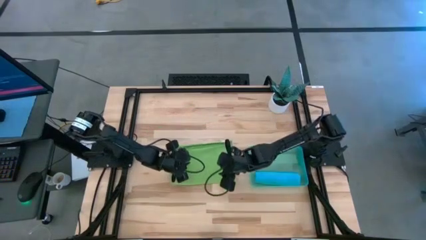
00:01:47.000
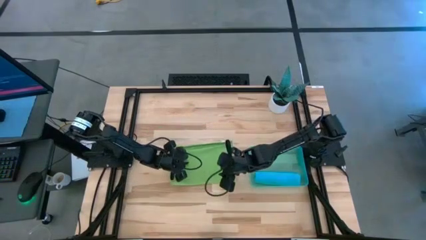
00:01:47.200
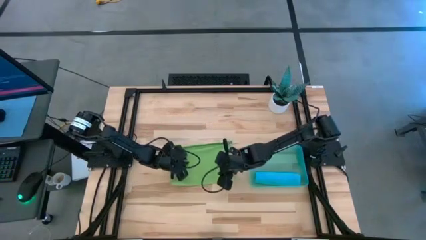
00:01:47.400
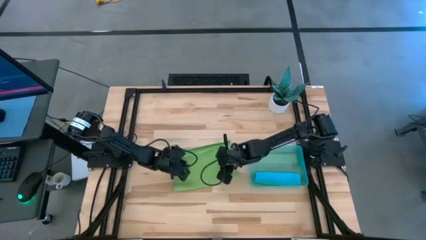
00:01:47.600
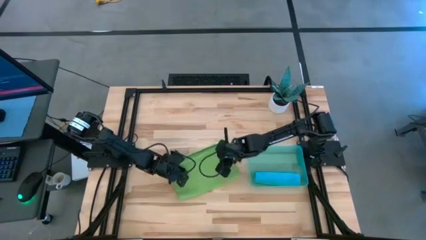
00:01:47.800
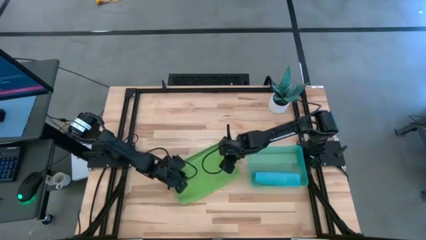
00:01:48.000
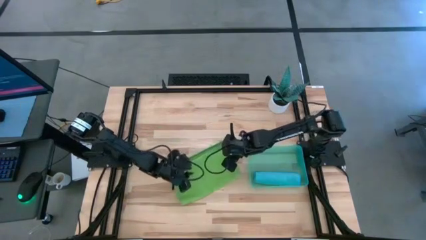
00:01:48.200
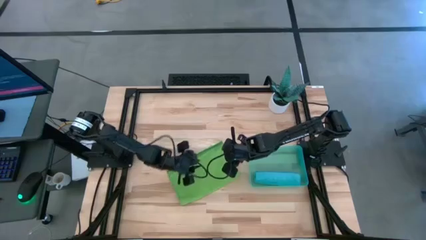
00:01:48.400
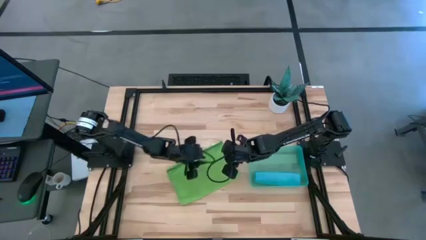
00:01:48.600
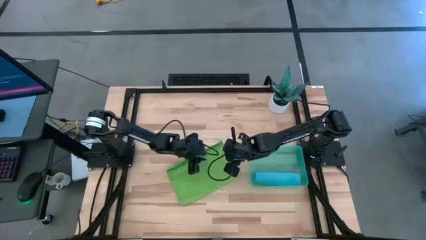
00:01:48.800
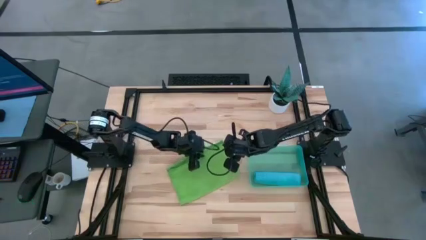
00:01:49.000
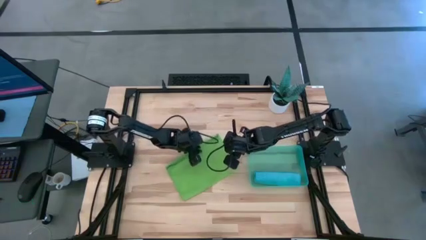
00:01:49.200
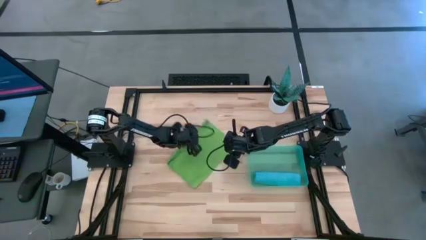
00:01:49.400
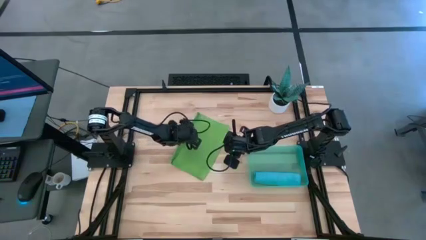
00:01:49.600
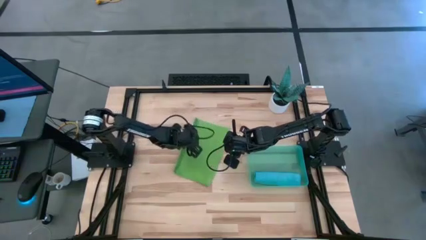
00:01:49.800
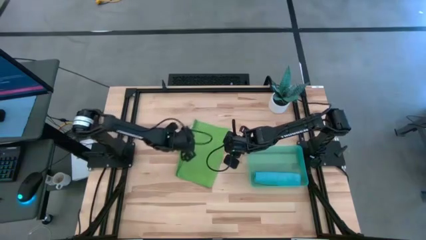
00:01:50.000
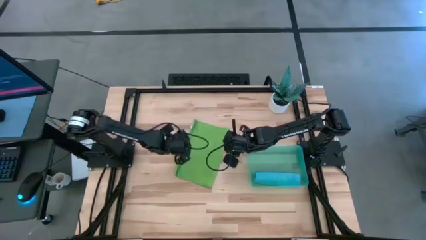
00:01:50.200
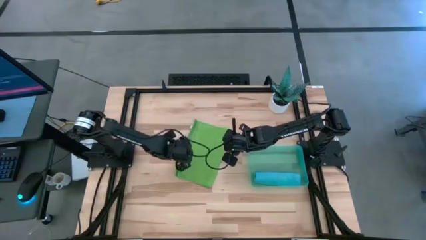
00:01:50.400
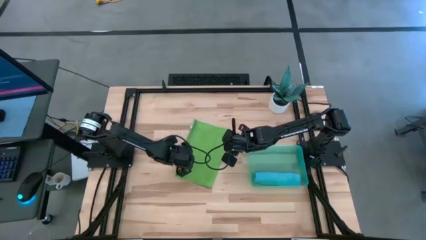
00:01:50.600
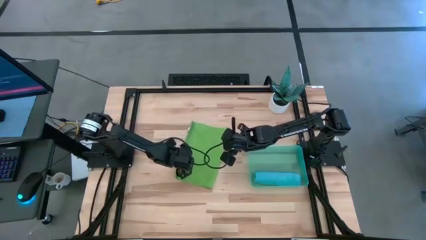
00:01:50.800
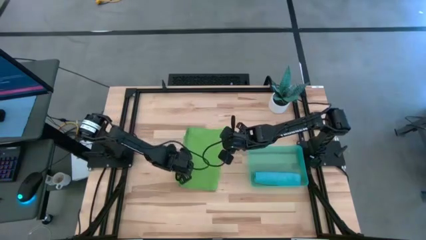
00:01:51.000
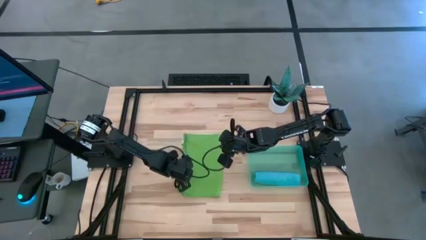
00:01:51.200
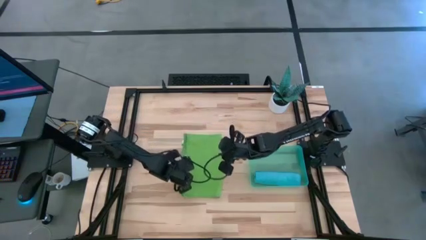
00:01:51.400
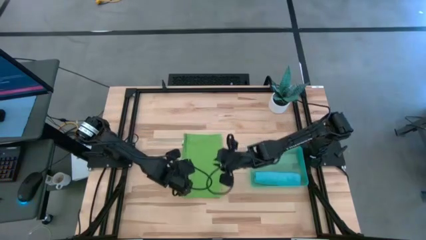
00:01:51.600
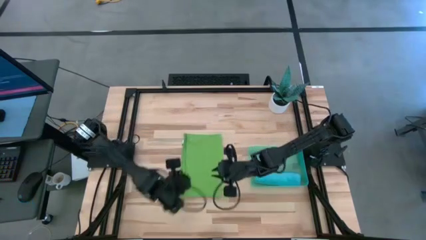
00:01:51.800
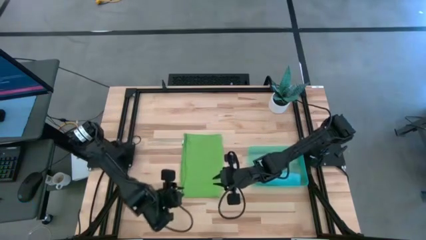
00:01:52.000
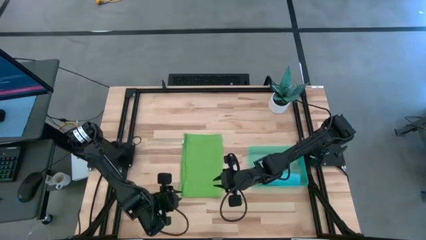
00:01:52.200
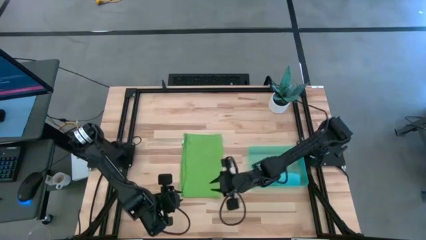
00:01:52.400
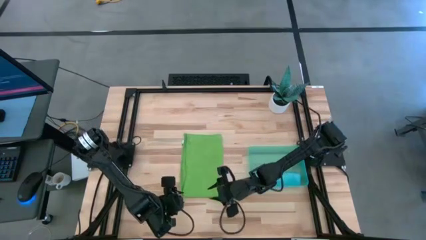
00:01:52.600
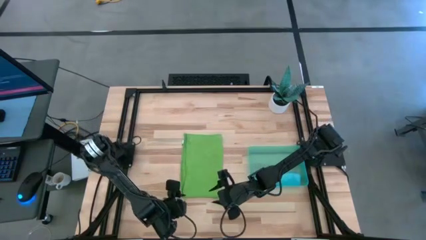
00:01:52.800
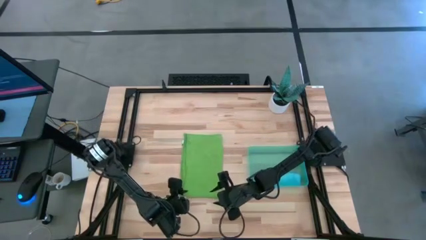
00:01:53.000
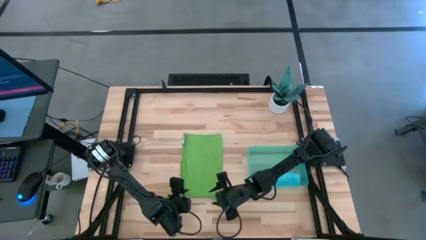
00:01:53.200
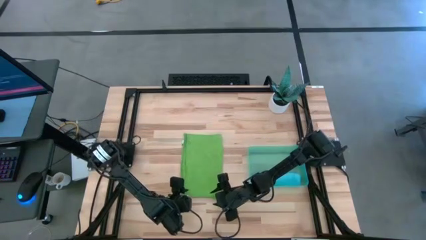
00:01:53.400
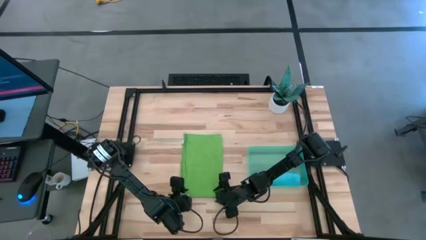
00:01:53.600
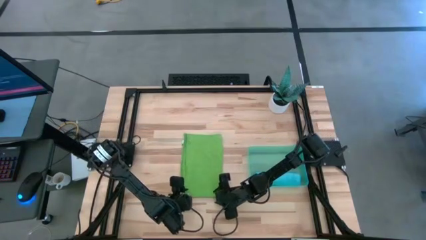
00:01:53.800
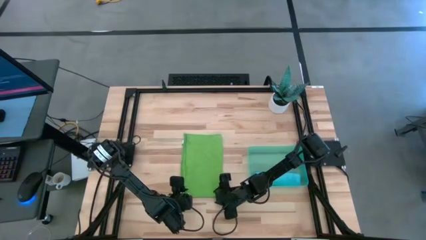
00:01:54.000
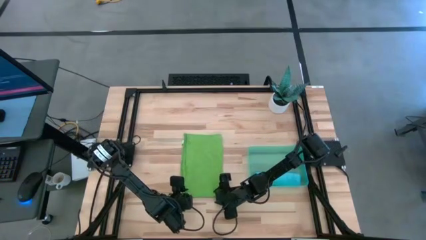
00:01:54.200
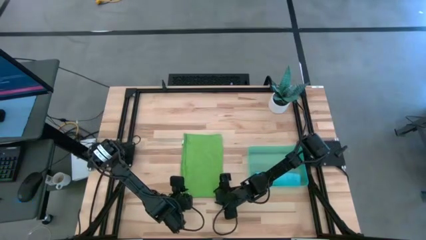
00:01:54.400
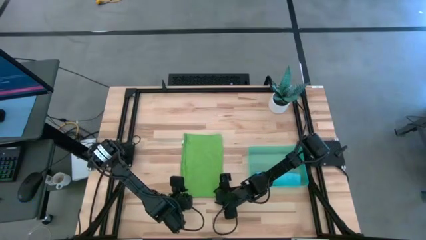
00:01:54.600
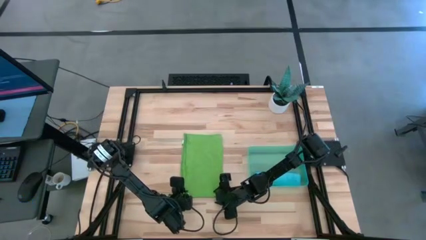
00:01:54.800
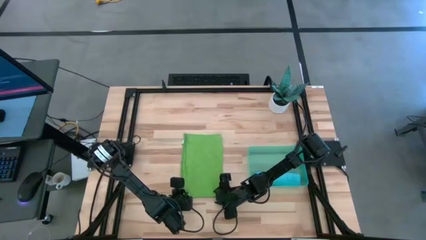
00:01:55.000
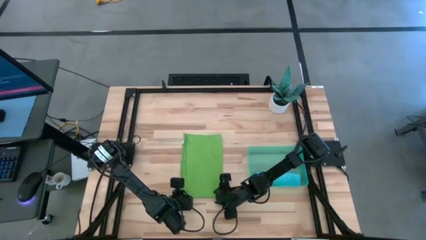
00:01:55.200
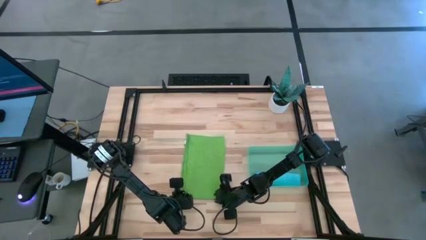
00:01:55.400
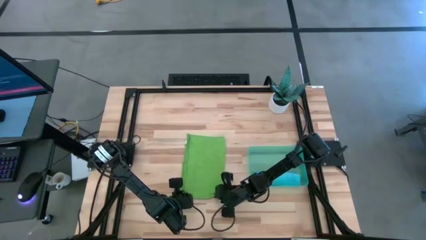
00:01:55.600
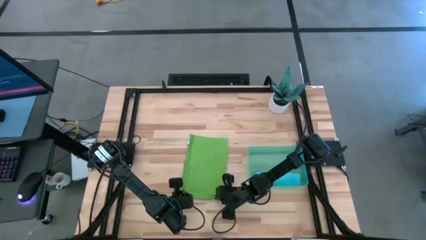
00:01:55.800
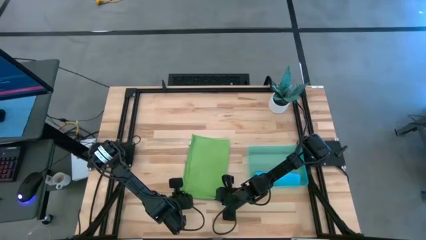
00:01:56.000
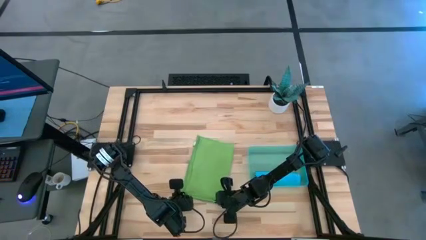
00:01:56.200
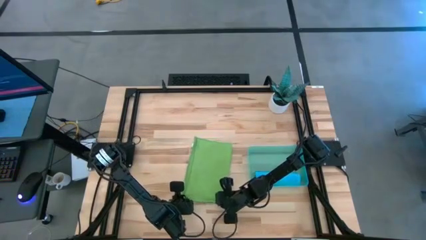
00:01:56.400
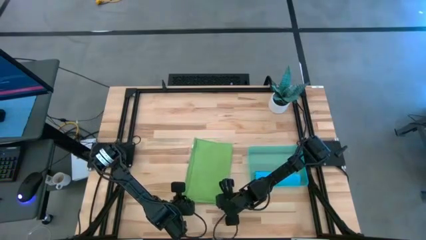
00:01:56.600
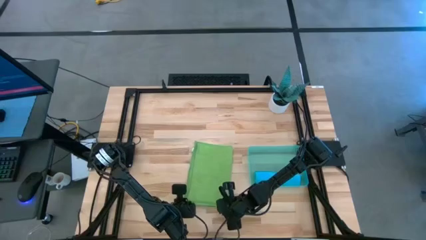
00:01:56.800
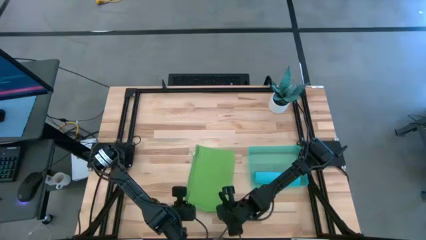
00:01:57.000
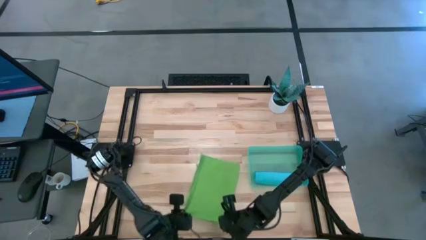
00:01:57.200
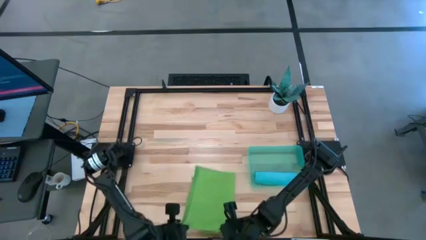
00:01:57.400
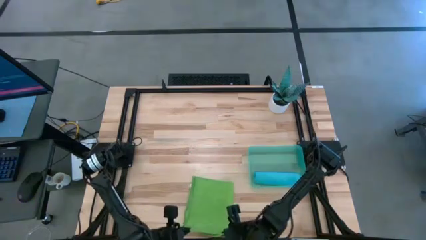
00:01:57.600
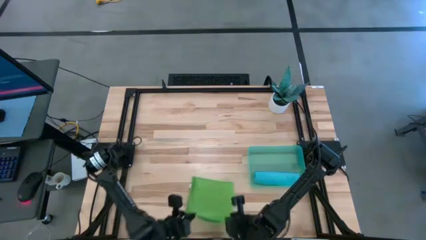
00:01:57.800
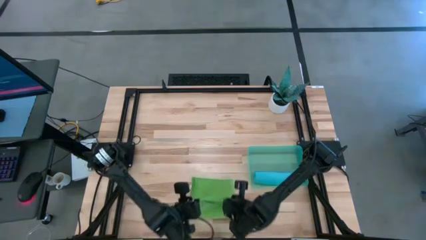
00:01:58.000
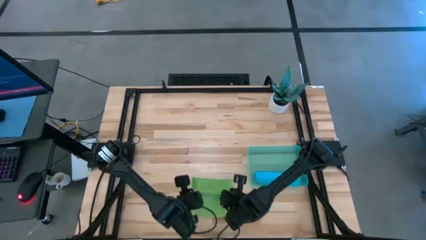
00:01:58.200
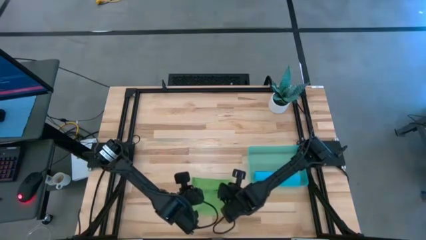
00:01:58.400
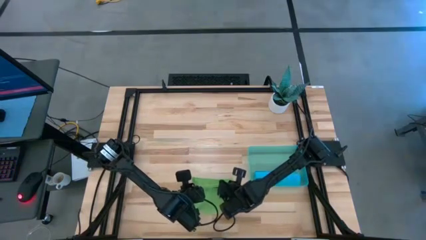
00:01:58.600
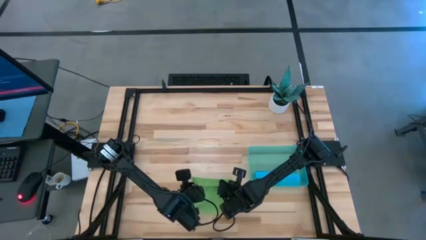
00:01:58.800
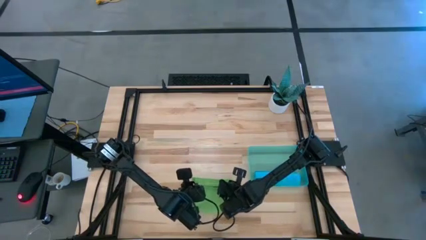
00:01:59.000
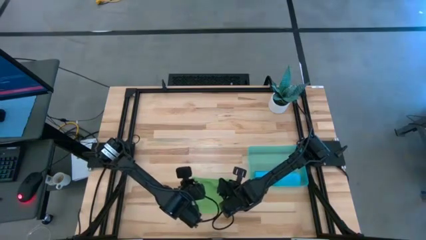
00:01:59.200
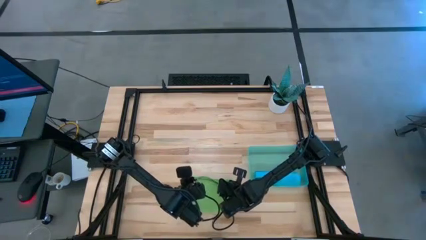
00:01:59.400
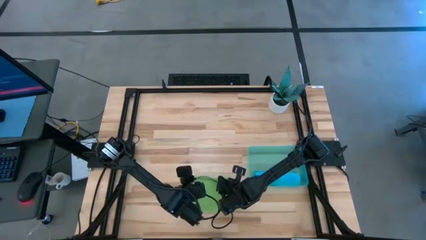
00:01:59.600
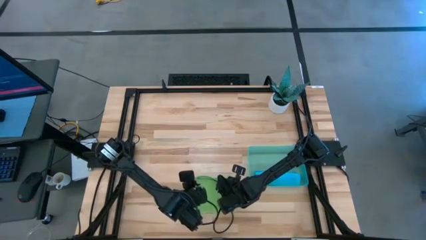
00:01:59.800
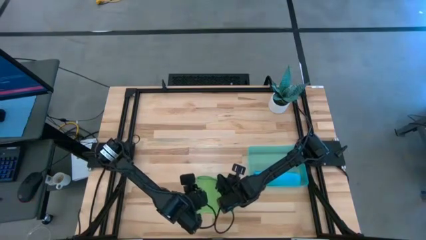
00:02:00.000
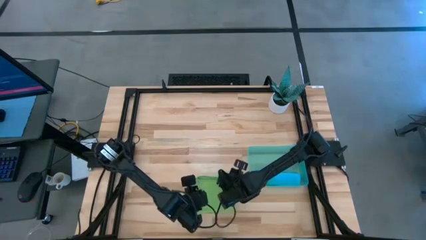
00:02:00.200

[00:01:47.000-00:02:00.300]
Task: Roll microfiber towels into tight, uniform cylinder then place into a basket
Fold the green microfiber towel

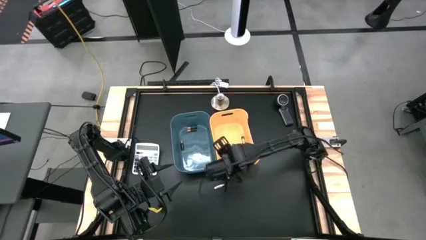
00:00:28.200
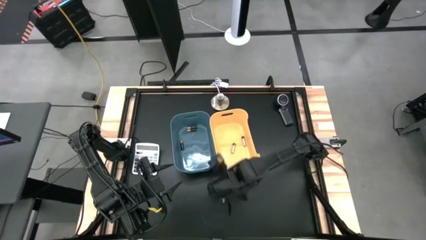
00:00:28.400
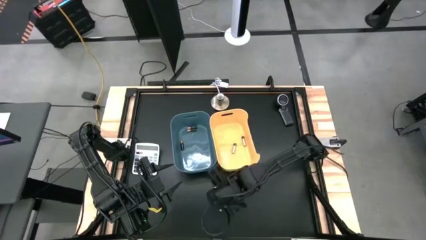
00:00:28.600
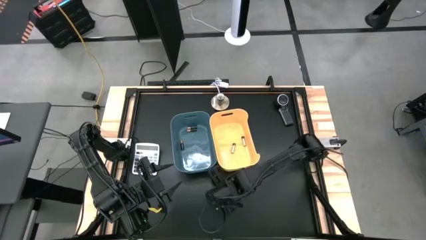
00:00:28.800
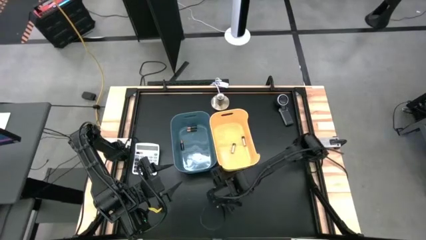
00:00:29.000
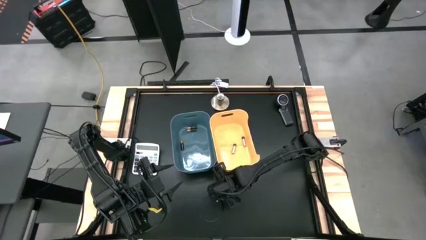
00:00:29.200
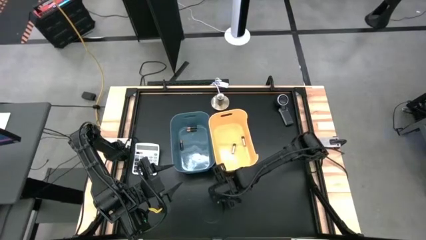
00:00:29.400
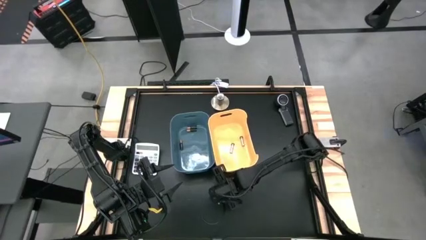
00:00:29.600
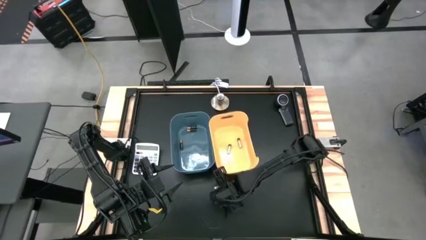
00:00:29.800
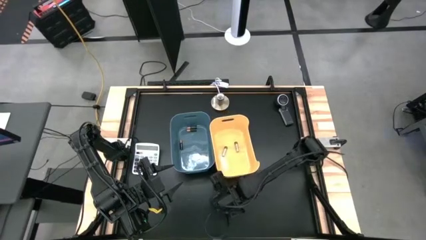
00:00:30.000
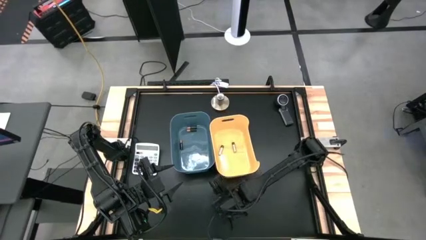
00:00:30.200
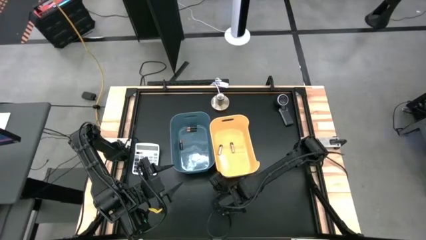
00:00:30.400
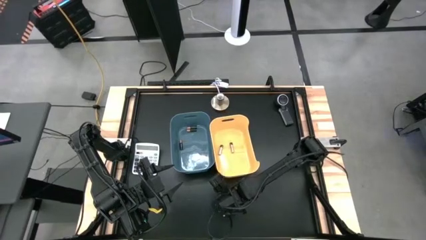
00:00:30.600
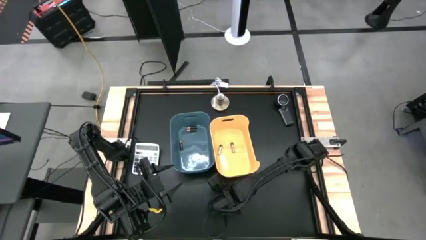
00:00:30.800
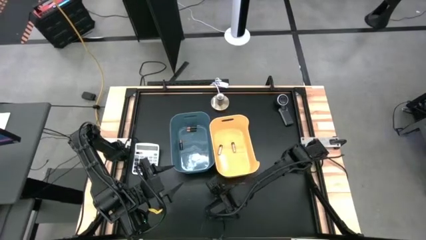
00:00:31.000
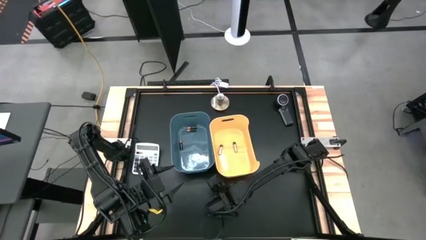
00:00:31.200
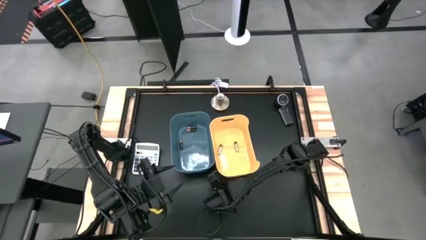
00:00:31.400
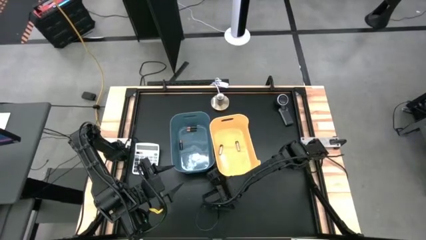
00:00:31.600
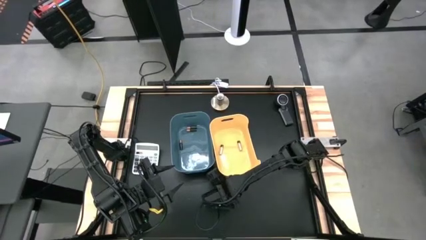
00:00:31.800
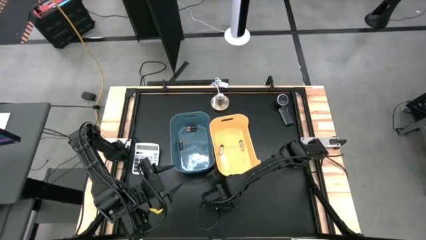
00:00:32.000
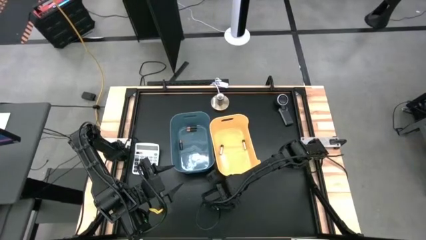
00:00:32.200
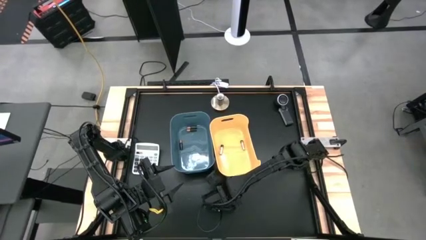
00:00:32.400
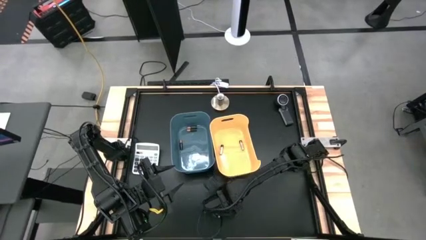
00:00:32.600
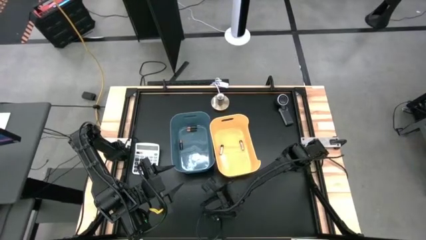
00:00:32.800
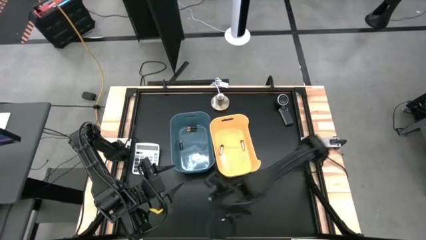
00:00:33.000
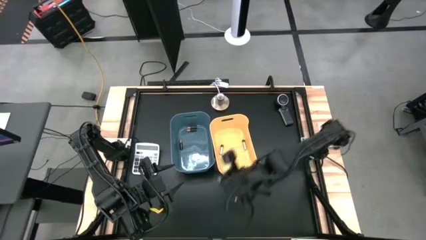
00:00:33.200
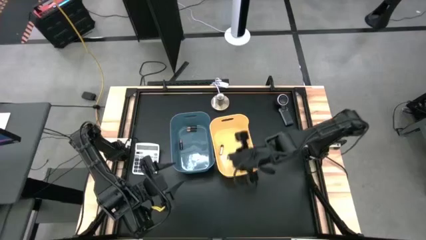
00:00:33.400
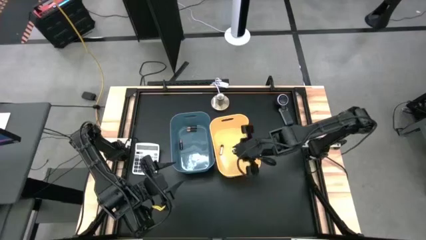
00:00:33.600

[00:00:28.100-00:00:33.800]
Task: Sort batteries
Put the silver battery into the yellow bin
